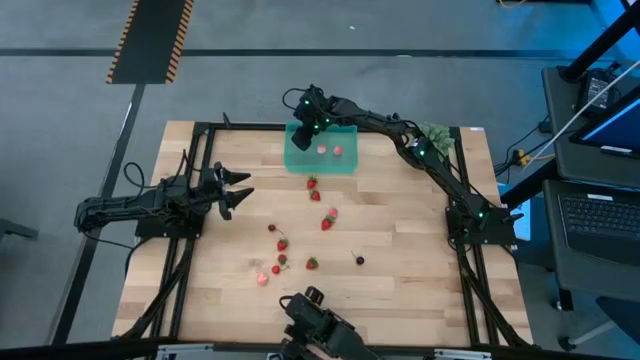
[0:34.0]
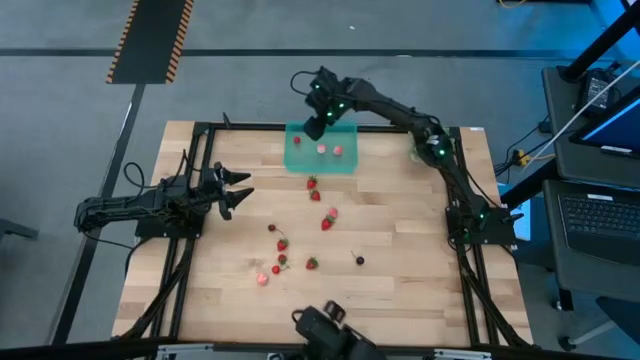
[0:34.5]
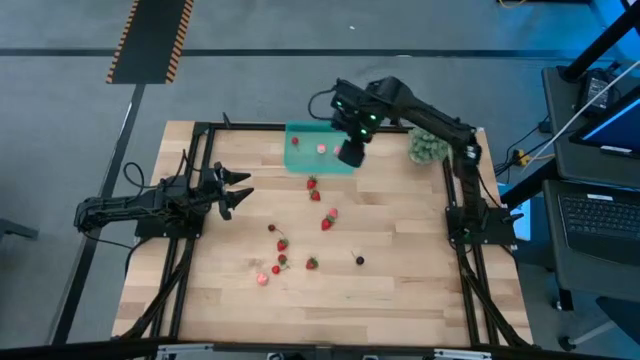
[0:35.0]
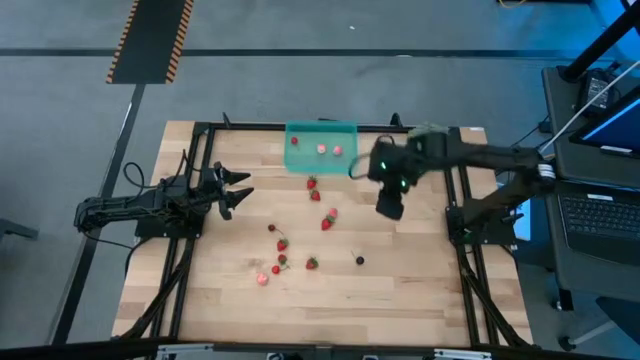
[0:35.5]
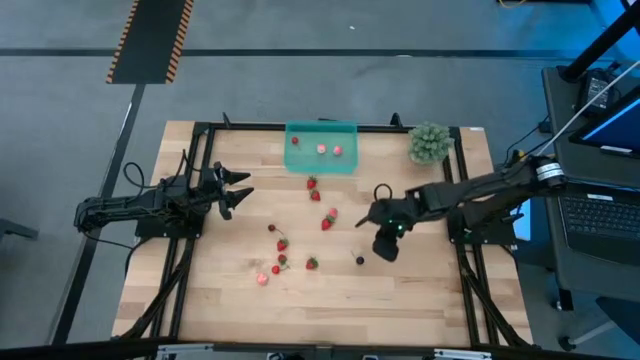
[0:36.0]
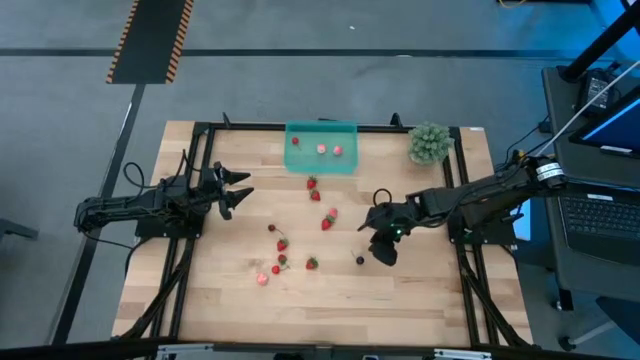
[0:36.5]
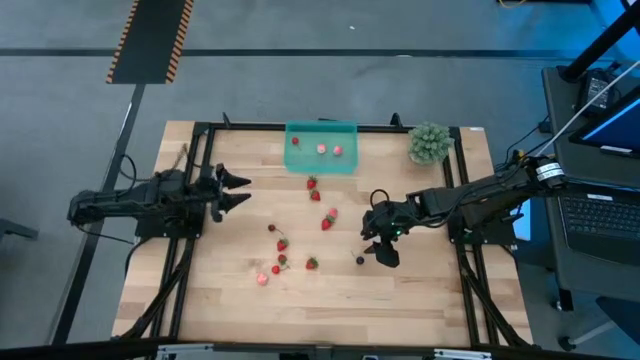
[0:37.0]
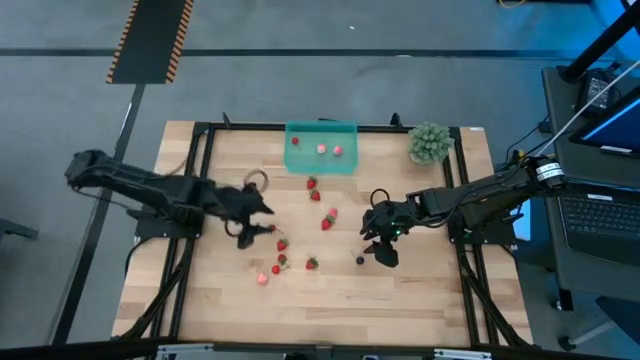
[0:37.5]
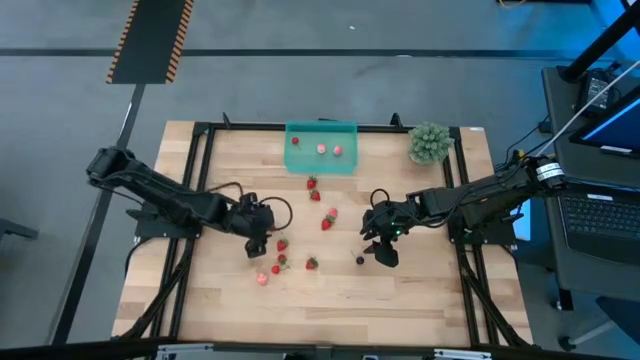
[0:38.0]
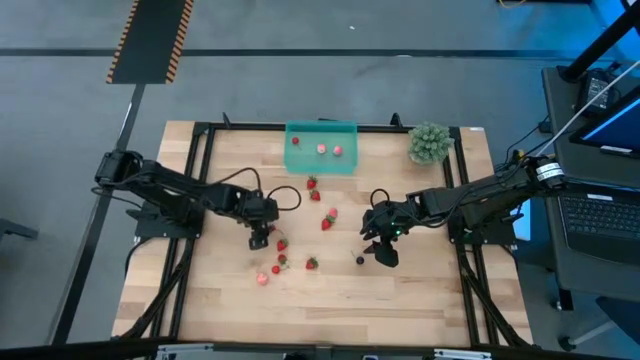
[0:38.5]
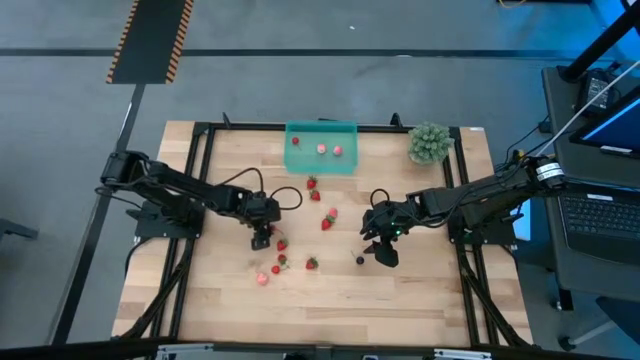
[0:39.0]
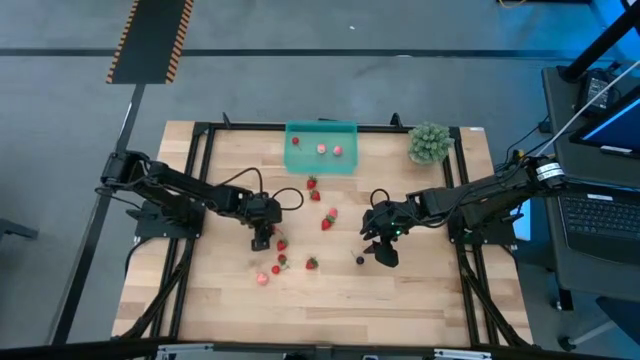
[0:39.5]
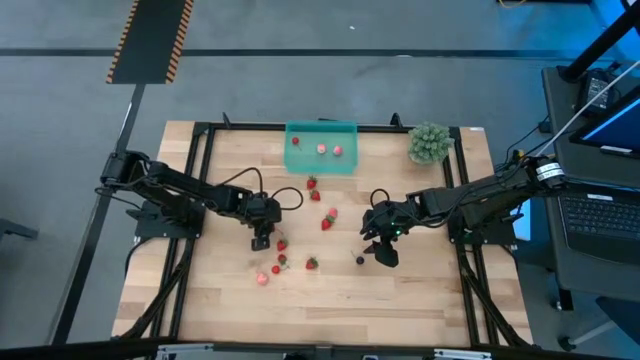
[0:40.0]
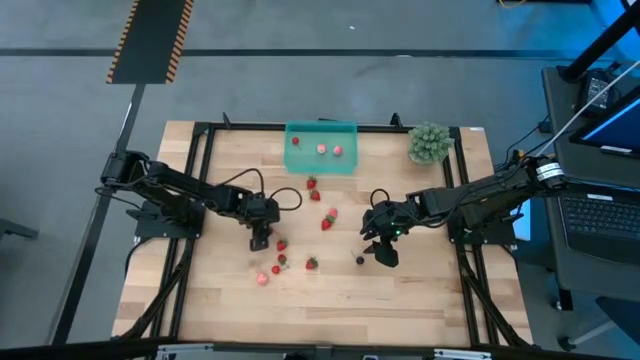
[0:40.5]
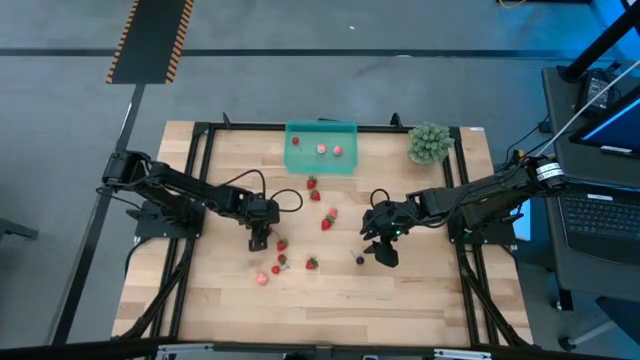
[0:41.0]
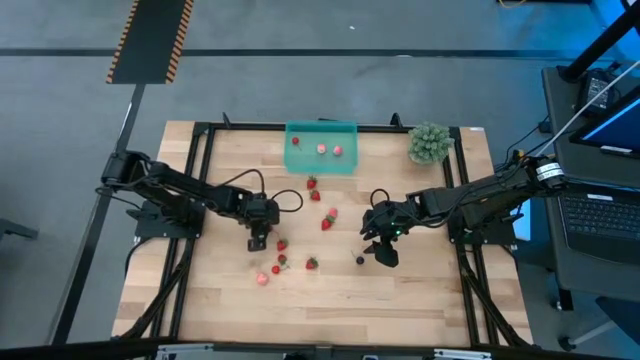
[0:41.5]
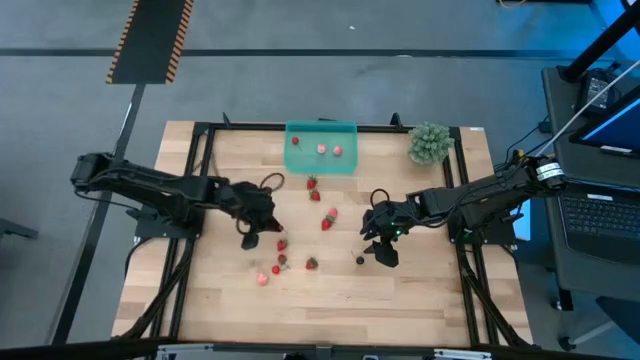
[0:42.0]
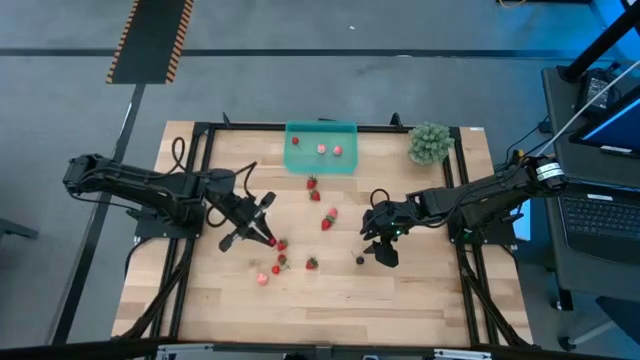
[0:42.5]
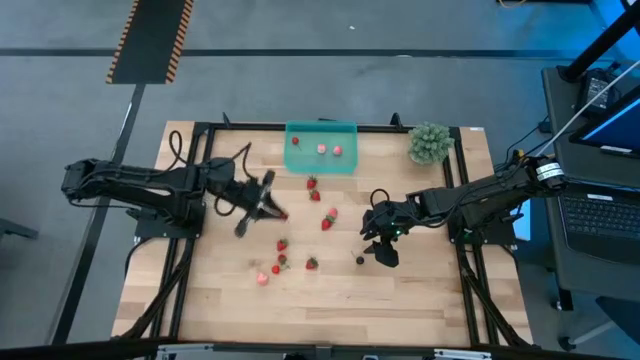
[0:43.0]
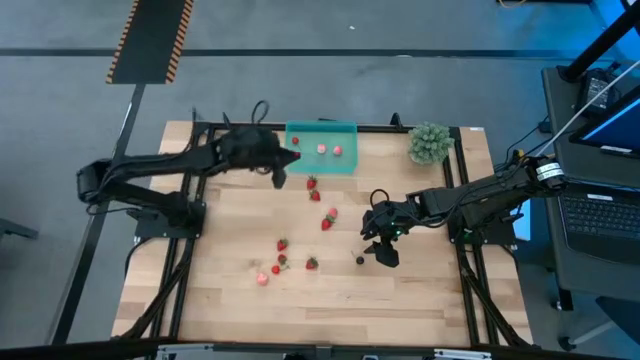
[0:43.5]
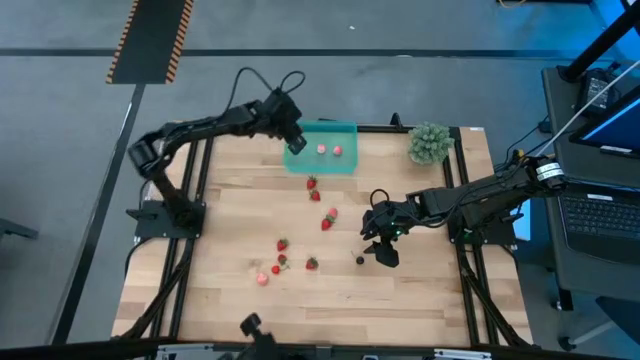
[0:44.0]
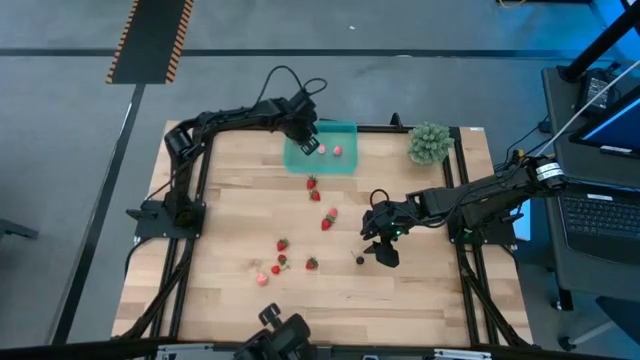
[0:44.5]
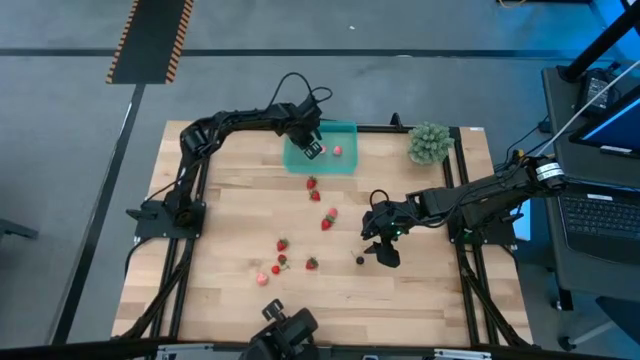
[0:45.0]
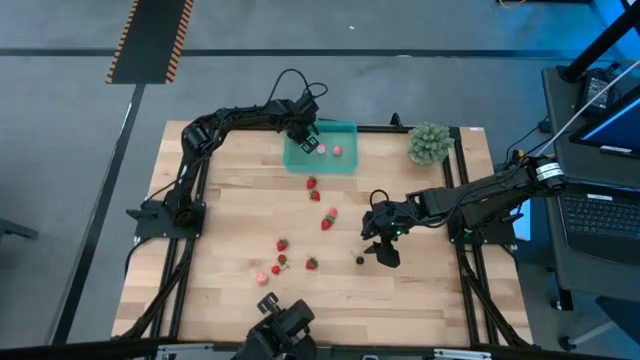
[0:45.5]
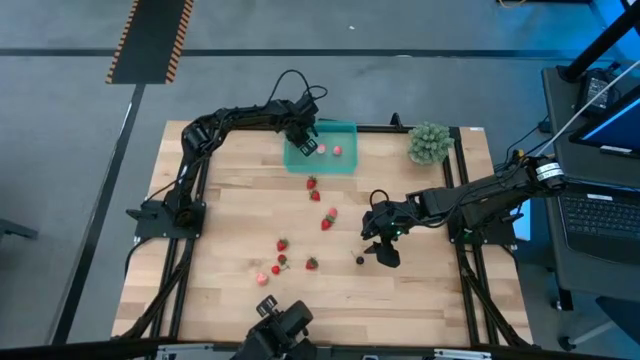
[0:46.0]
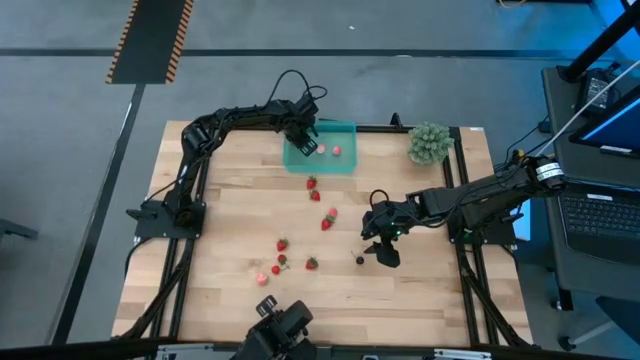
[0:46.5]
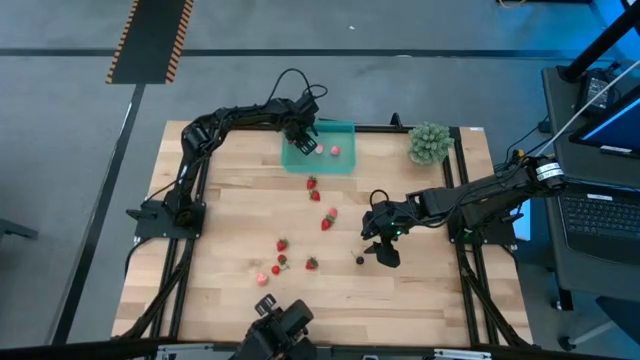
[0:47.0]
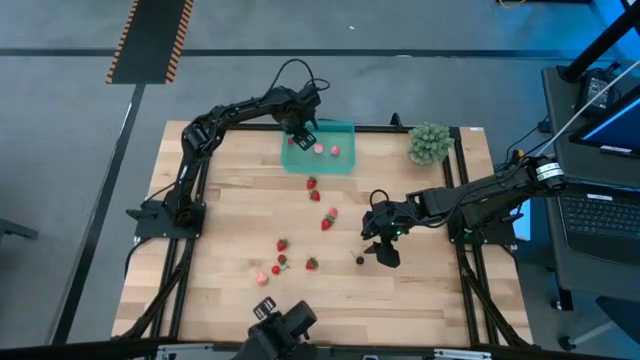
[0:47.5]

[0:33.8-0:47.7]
Task: Pick and placing Produce into tupperware
Put the red cherry into the green container

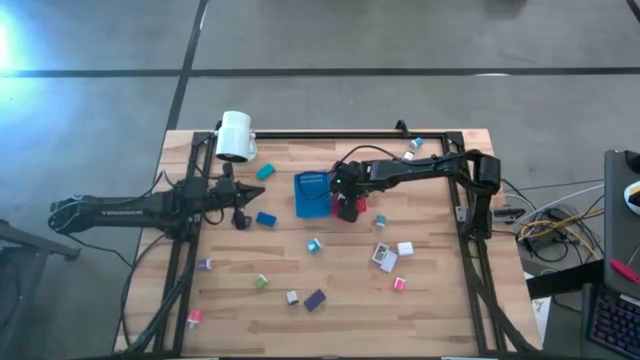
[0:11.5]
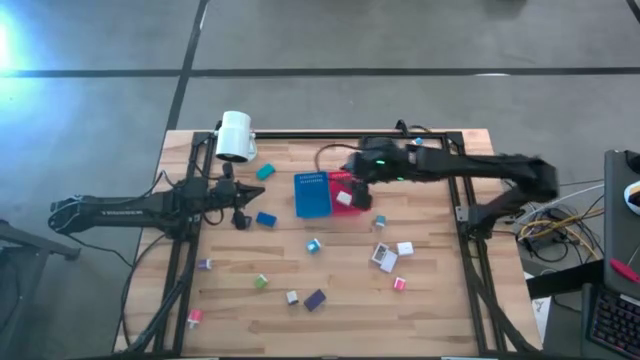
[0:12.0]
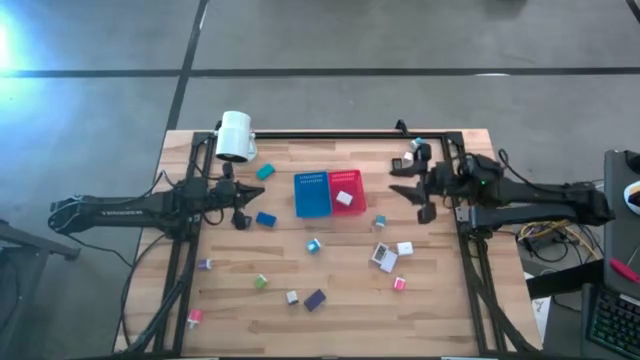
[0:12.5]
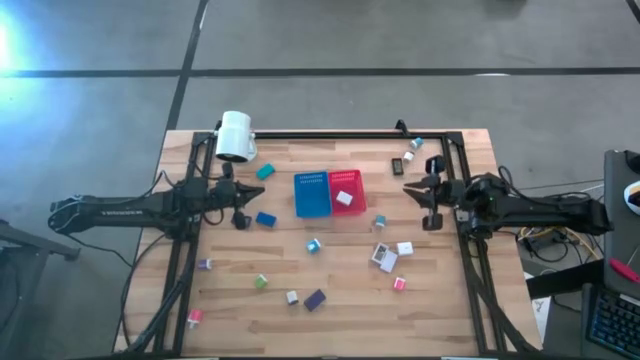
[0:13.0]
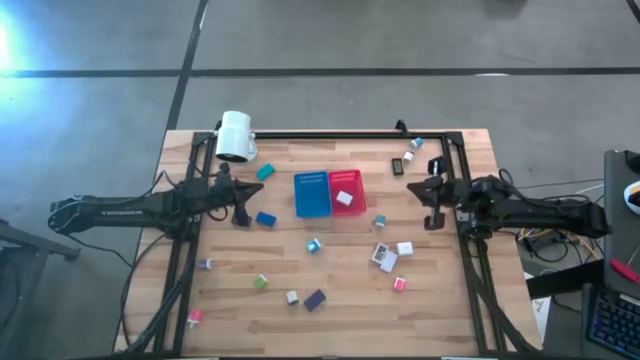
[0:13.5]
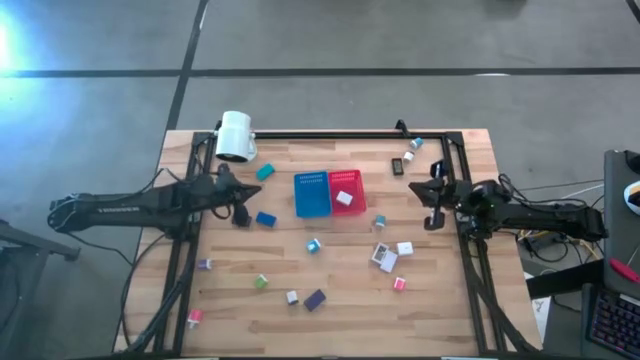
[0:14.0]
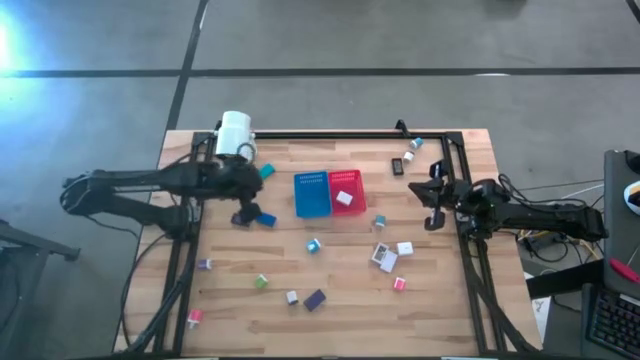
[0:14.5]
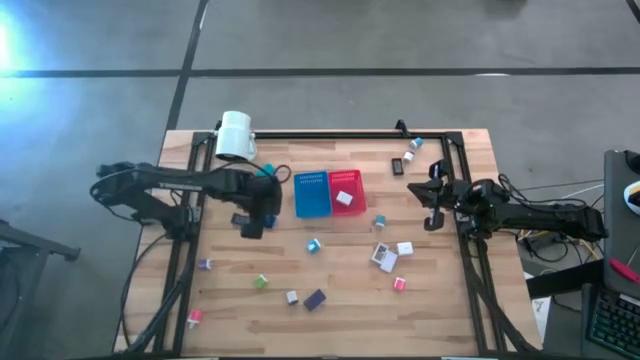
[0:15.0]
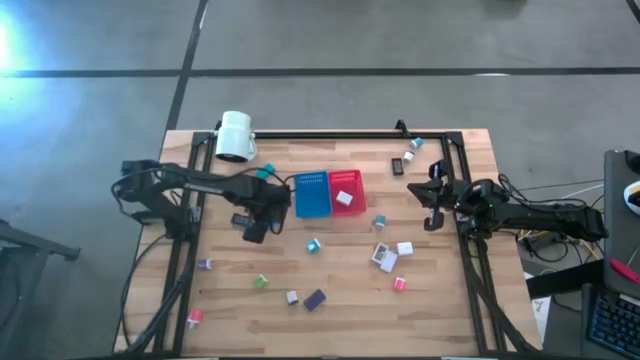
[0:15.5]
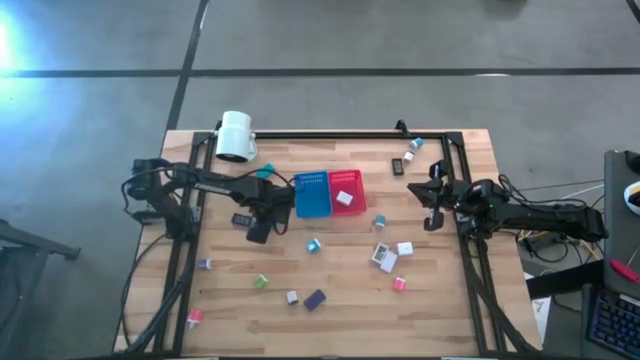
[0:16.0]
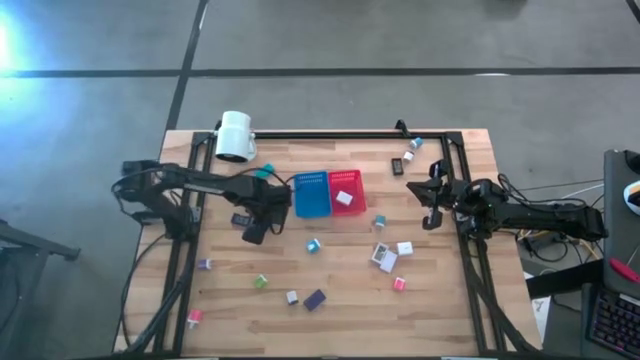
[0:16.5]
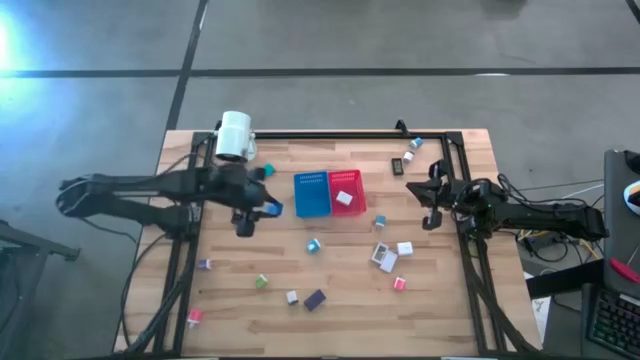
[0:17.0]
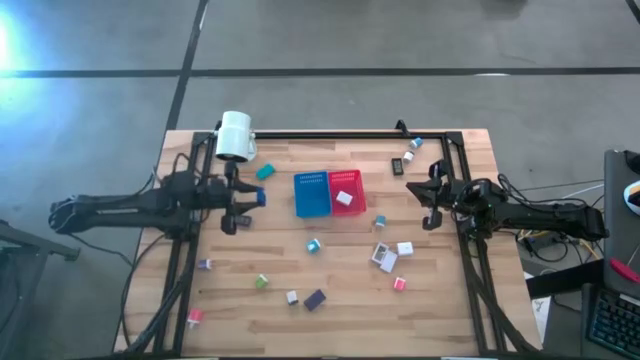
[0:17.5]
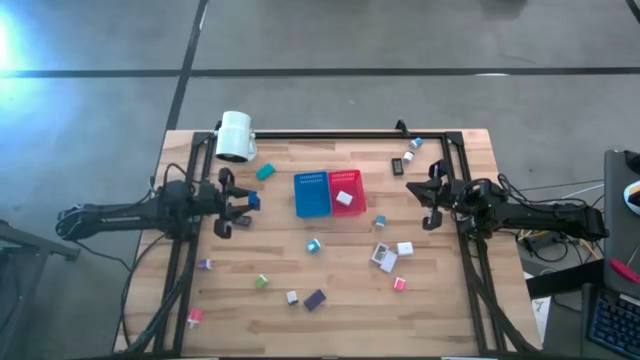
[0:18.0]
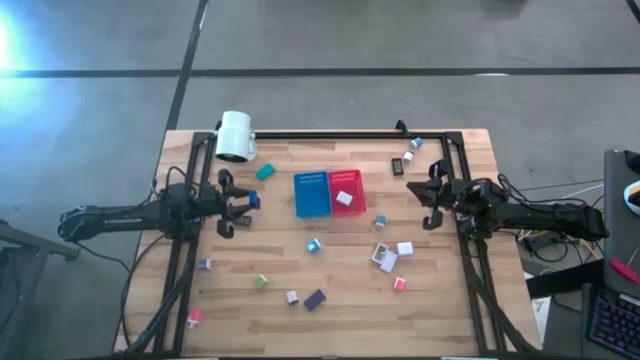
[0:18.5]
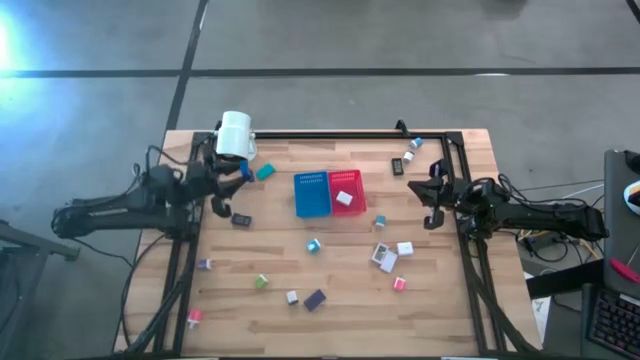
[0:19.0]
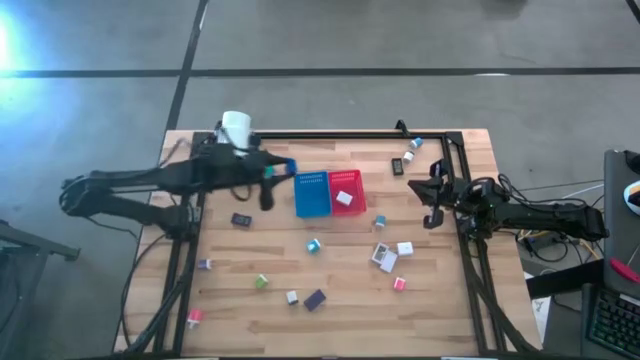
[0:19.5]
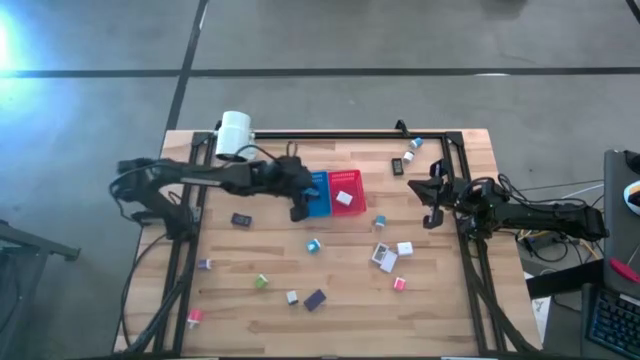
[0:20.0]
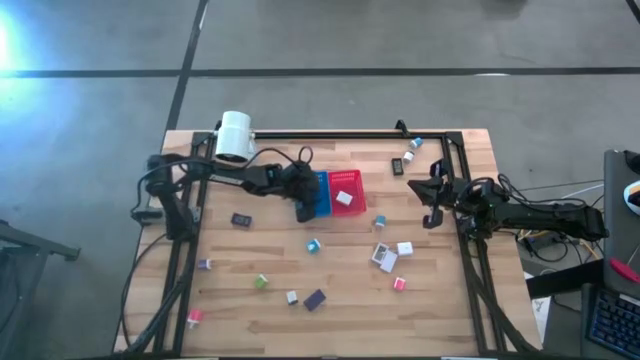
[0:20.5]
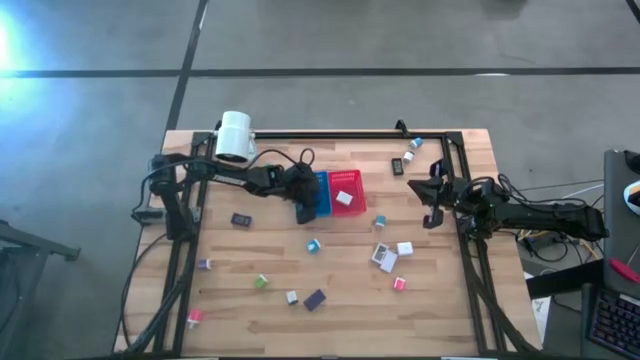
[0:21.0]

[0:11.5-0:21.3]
Task: Pick & Place Office items
Put the top blue digital clock into the blue bin
